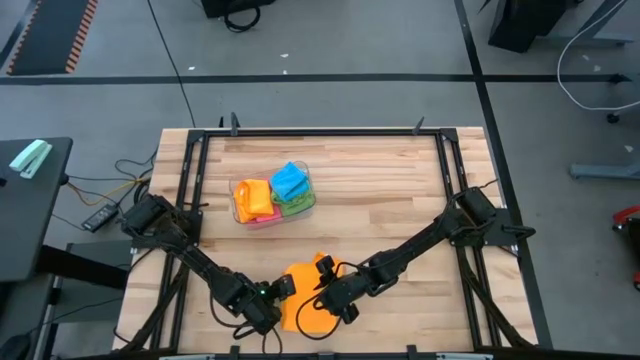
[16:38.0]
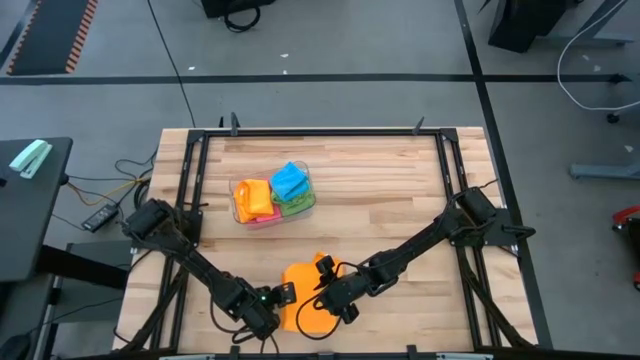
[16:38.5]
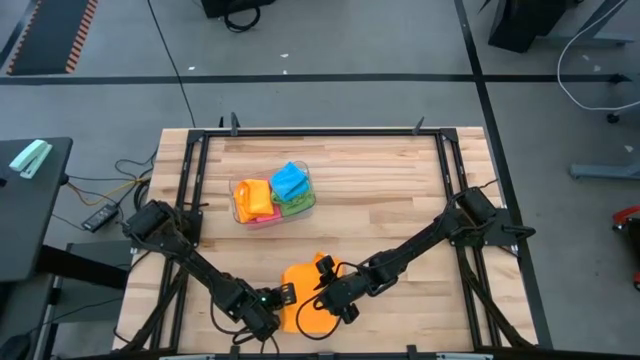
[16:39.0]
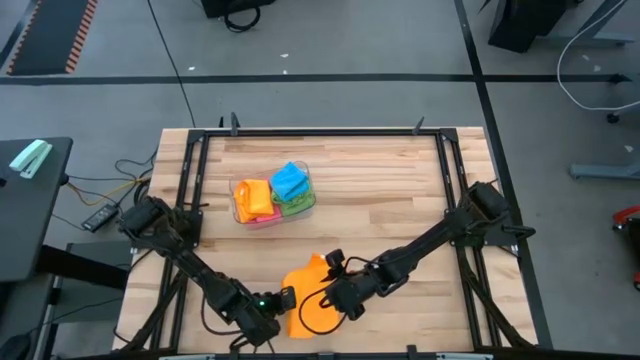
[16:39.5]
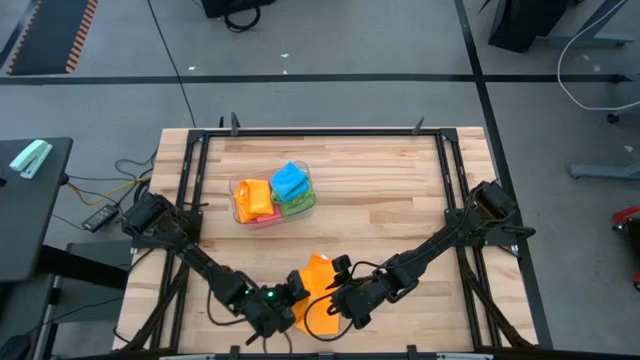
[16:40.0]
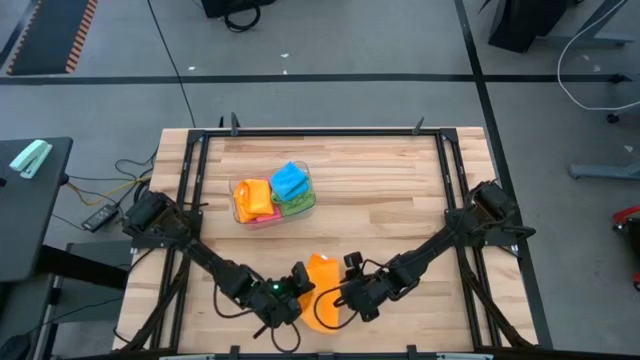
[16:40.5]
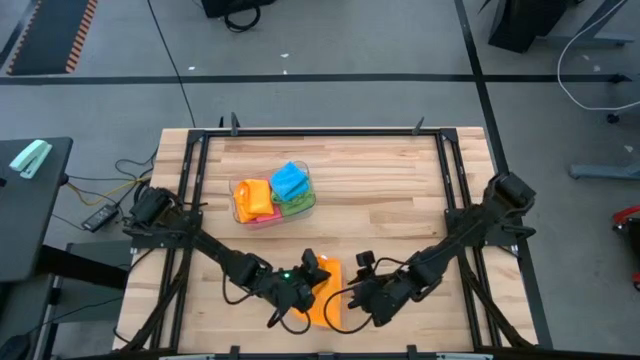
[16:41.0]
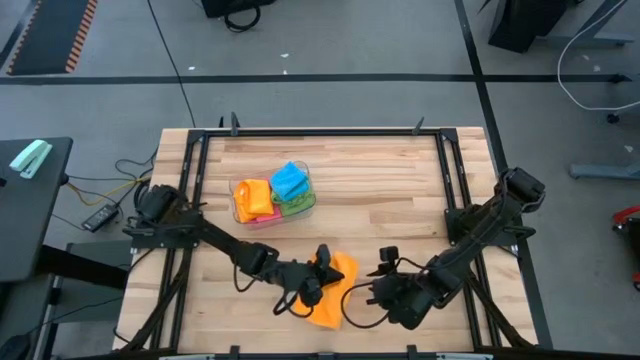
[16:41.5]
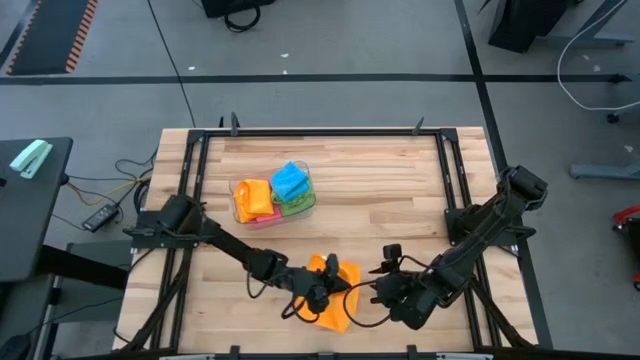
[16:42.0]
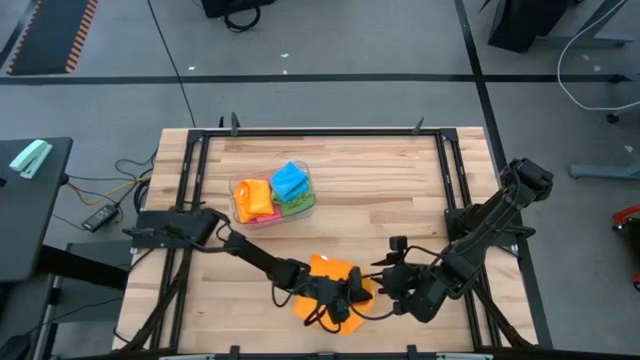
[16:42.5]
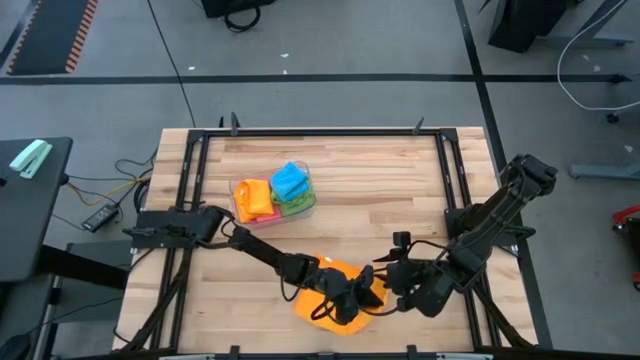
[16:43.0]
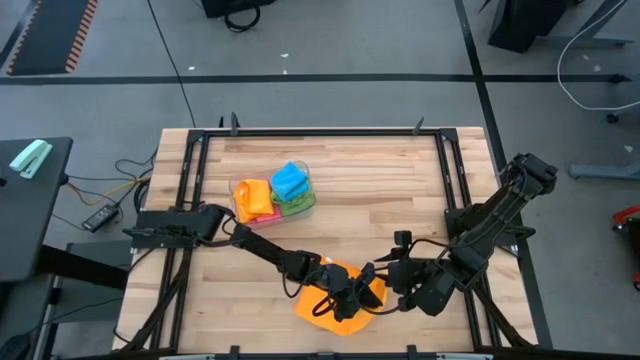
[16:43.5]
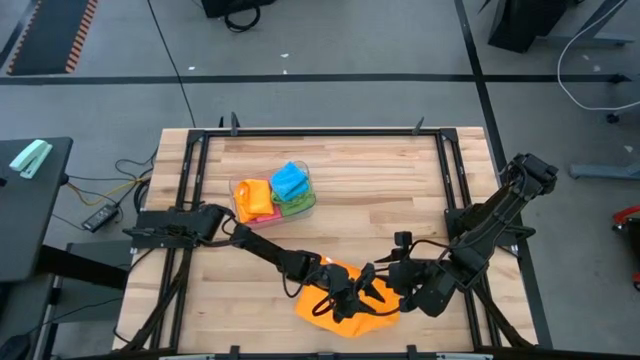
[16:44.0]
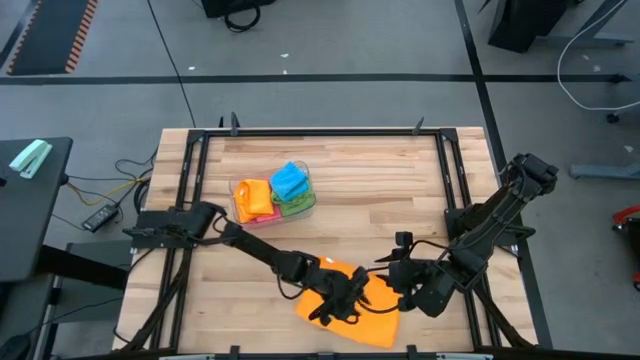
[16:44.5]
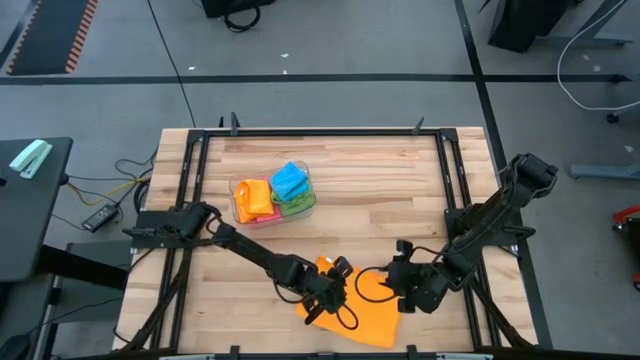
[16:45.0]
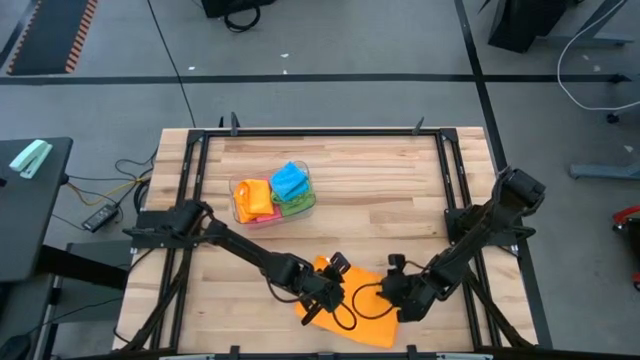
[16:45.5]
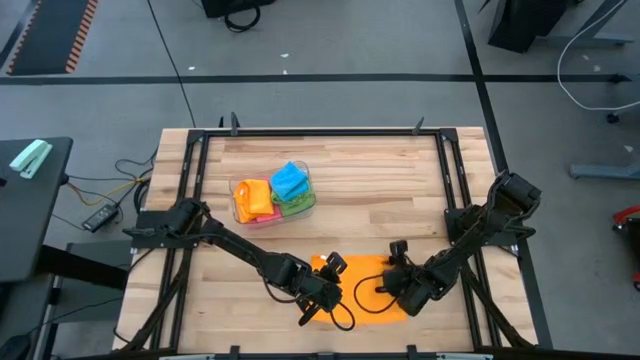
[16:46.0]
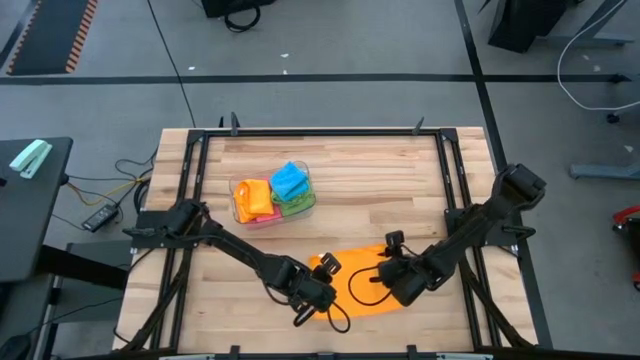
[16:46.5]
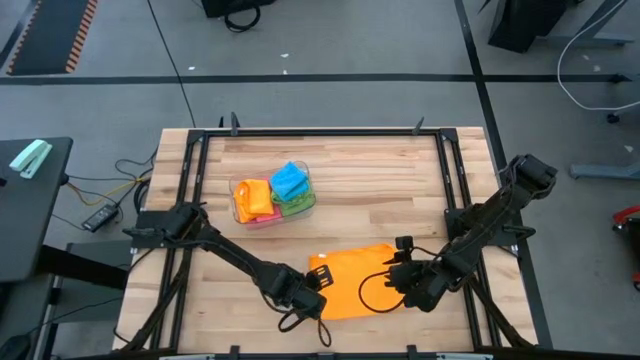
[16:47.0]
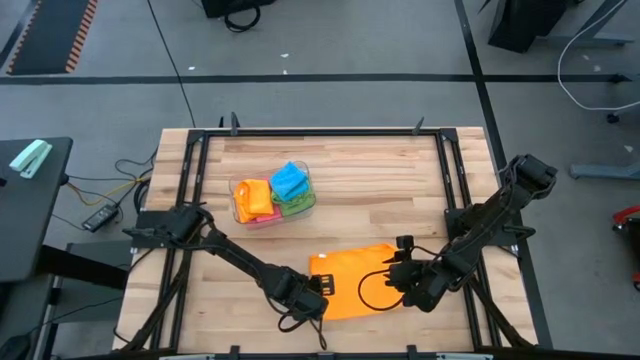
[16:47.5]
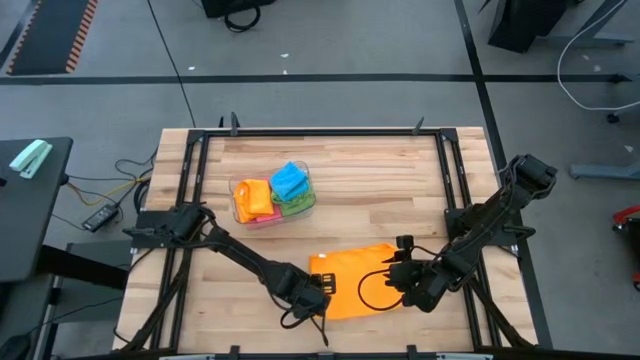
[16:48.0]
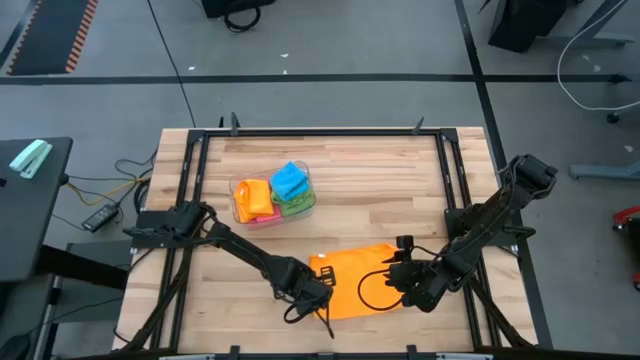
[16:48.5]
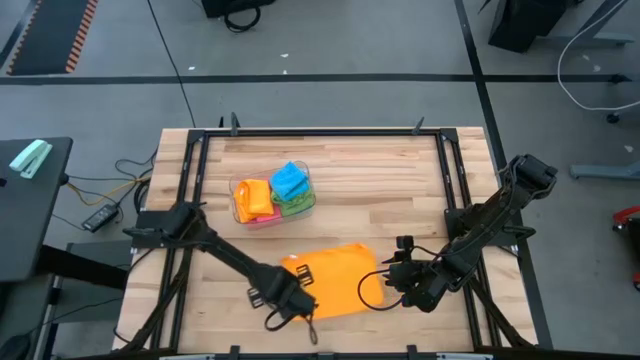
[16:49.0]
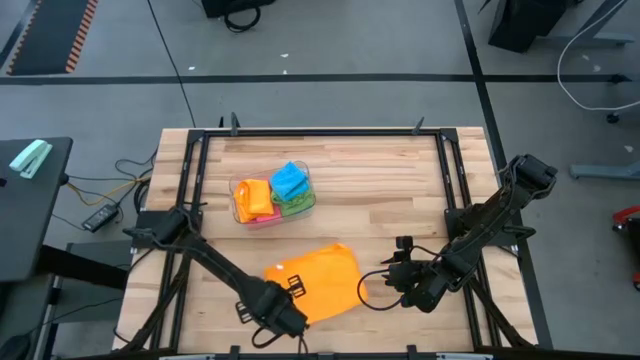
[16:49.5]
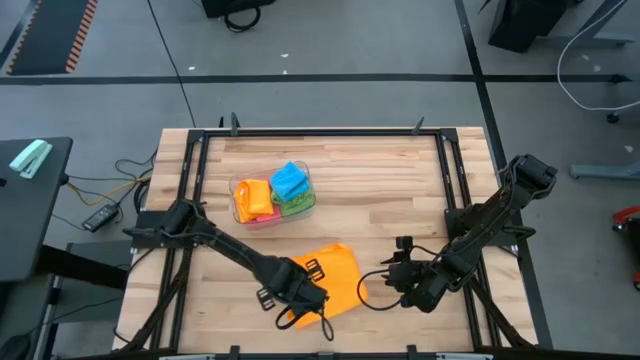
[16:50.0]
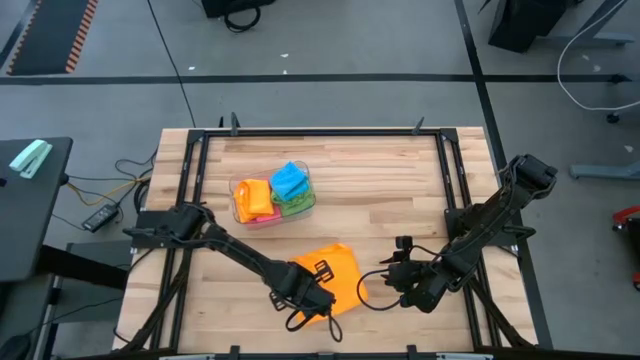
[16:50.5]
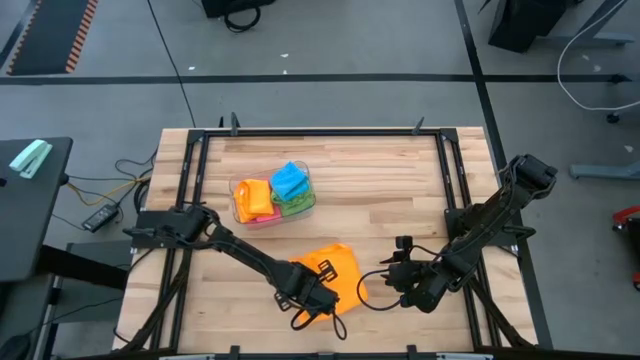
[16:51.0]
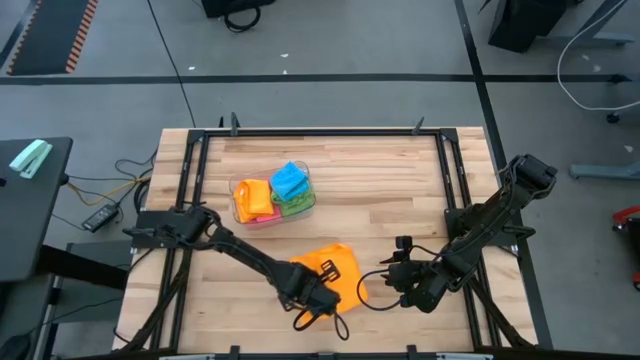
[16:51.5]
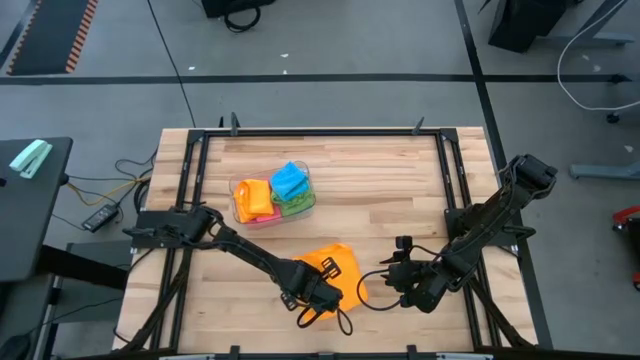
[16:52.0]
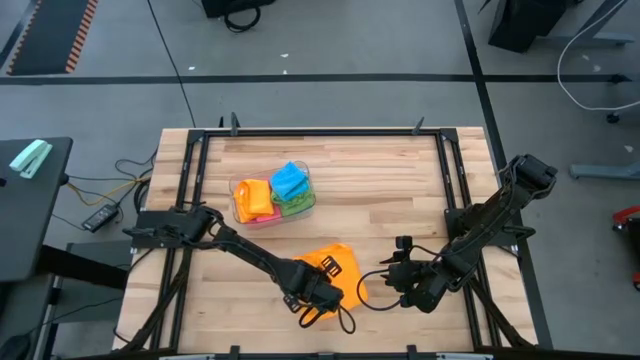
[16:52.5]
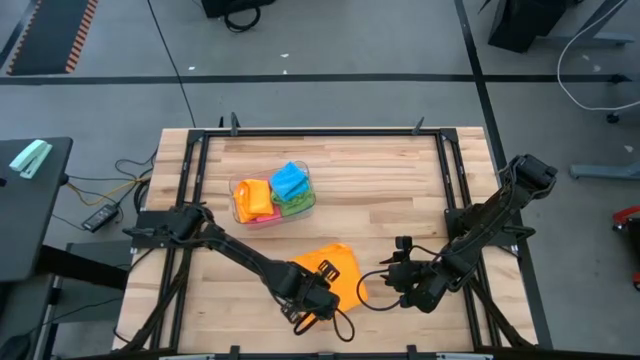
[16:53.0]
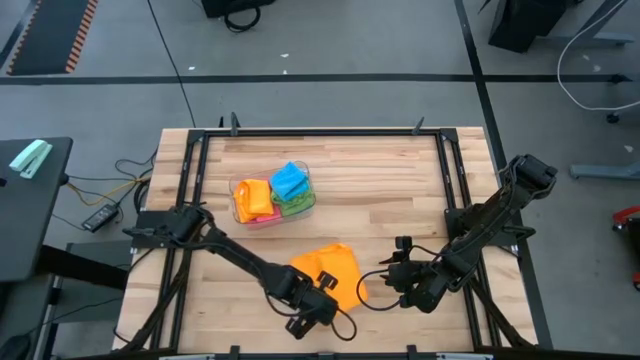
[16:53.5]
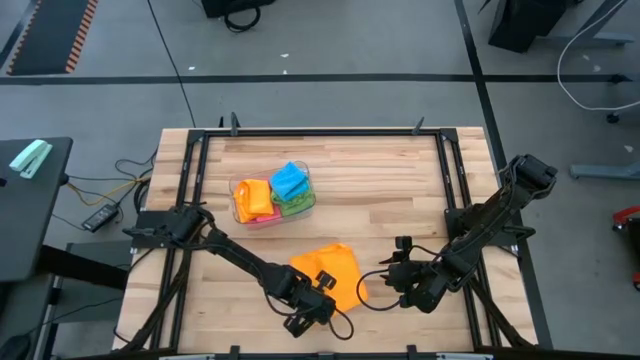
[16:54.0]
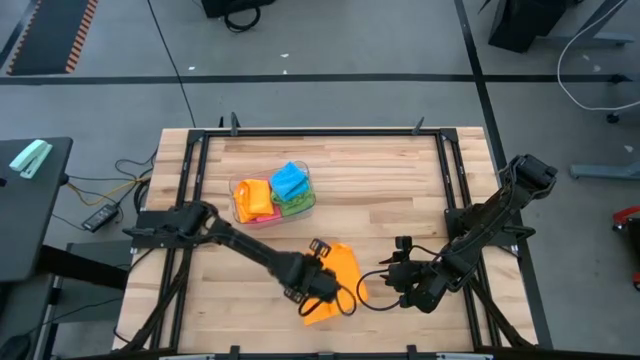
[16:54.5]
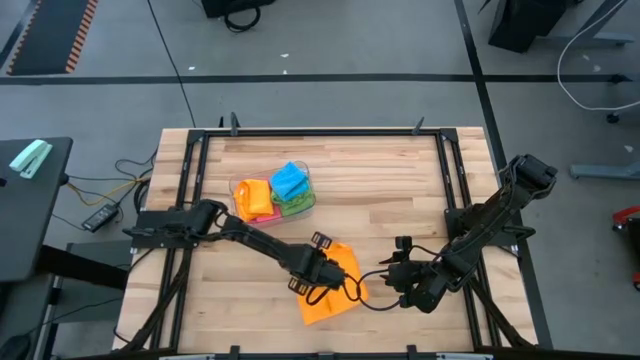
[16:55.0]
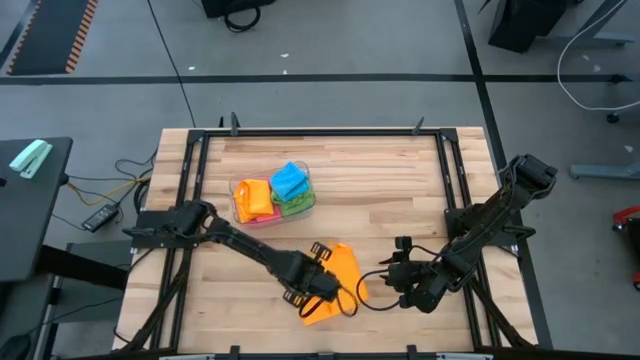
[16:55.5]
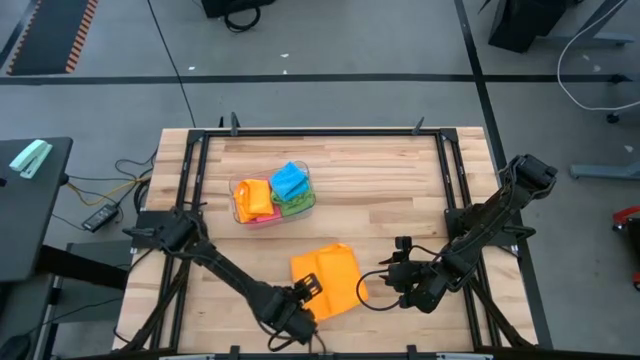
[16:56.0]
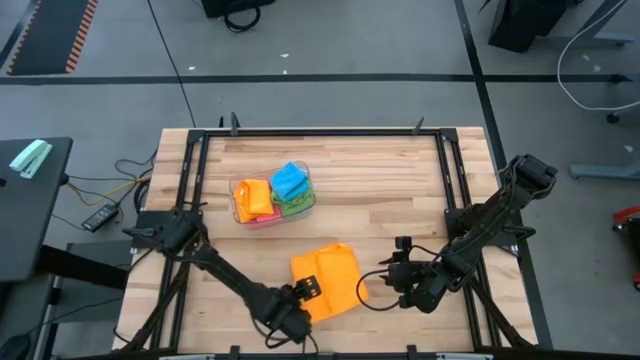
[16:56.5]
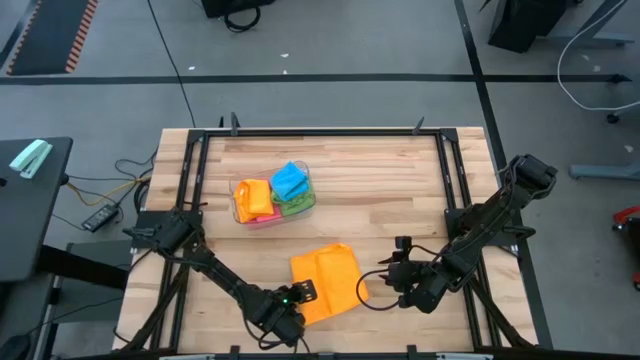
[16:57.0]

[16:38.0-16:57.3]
Task: Fold microfiber towels
Fold the yellow microfiber towel

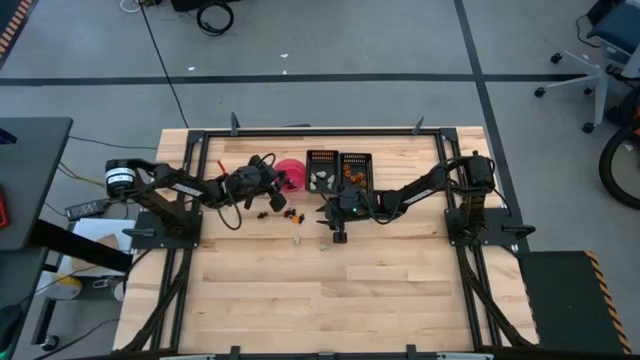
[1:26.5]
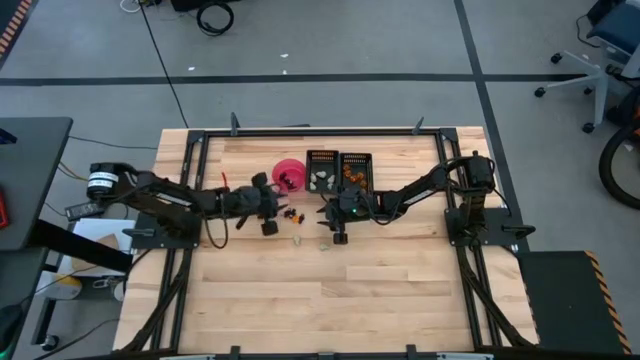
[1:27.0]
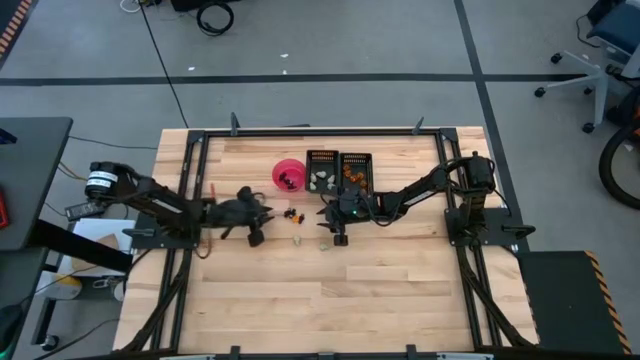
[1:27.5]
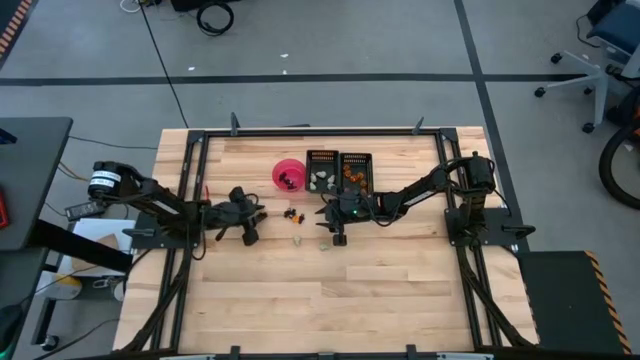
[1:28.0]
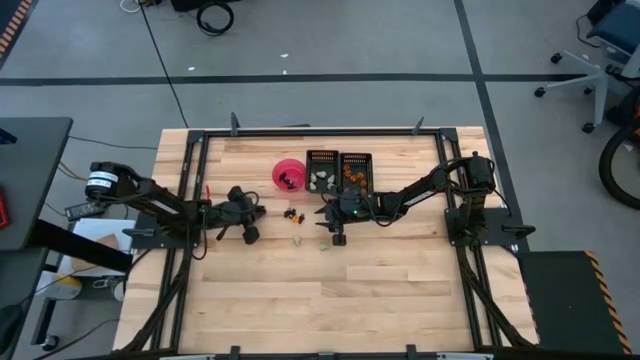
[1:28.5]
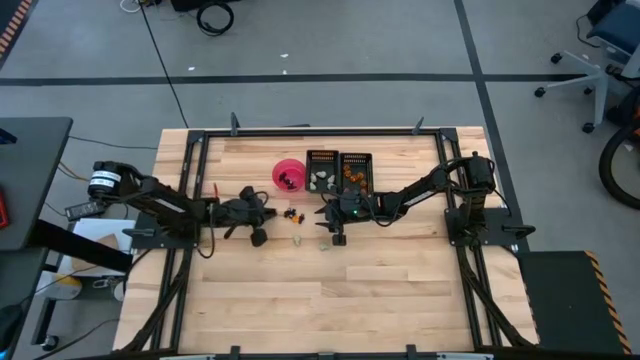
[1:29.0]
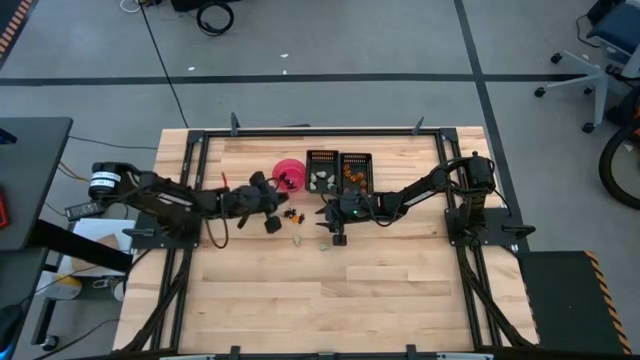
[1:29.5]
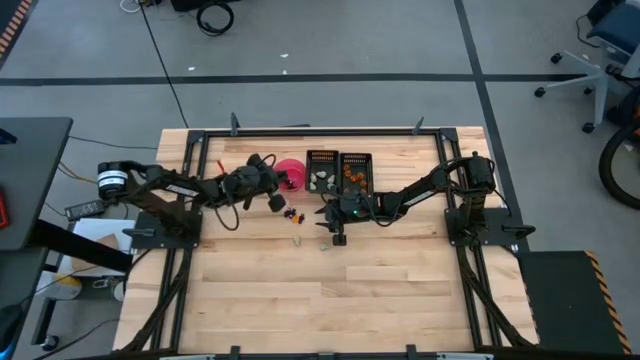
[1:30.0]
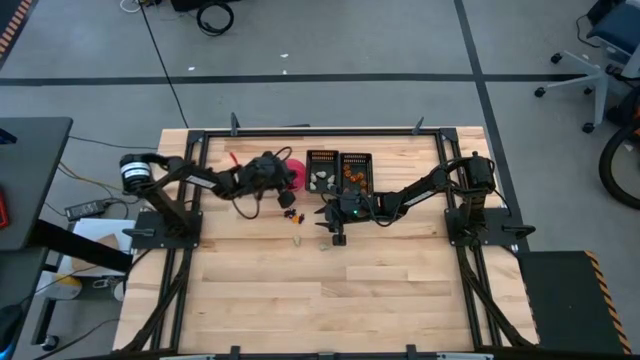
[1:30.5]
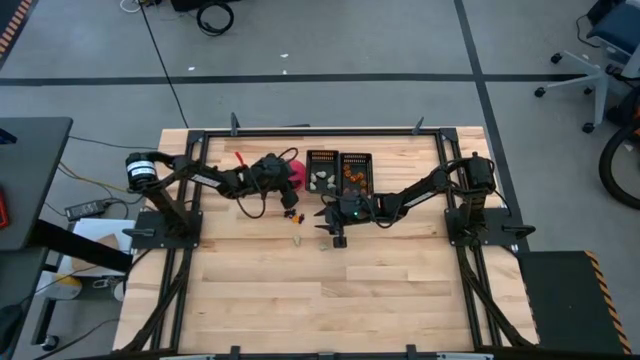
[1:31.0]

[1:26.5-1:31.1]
Task: Sort Halloween decoration
Put the black skeleton toy into the red bowl
